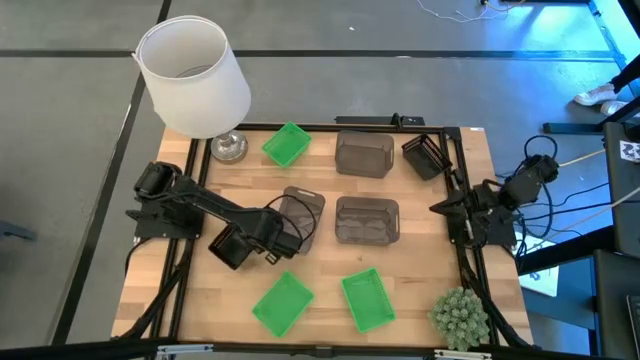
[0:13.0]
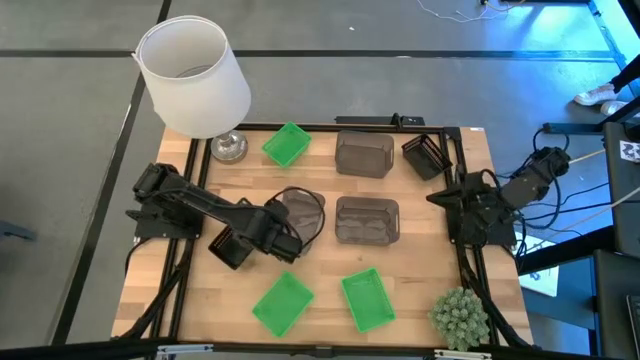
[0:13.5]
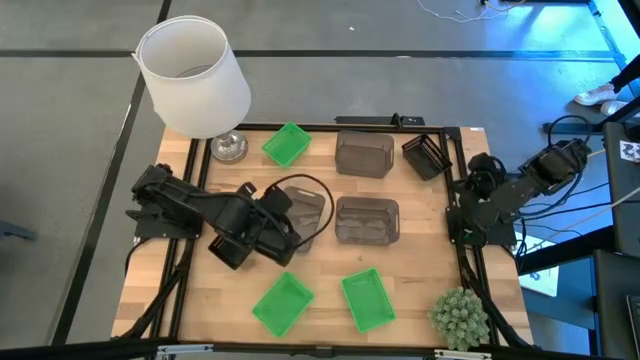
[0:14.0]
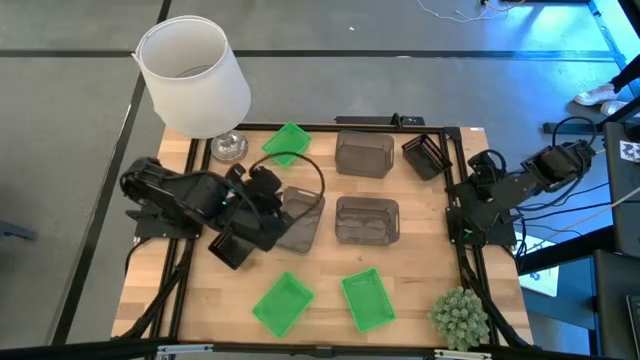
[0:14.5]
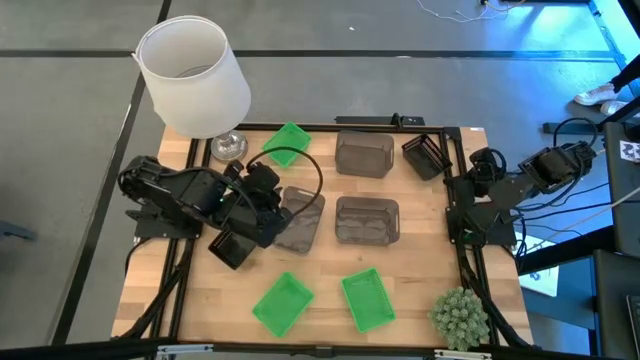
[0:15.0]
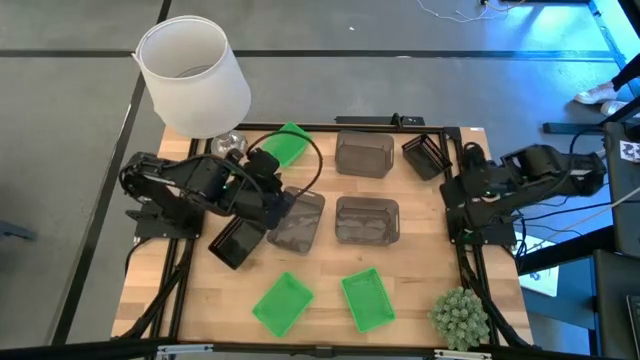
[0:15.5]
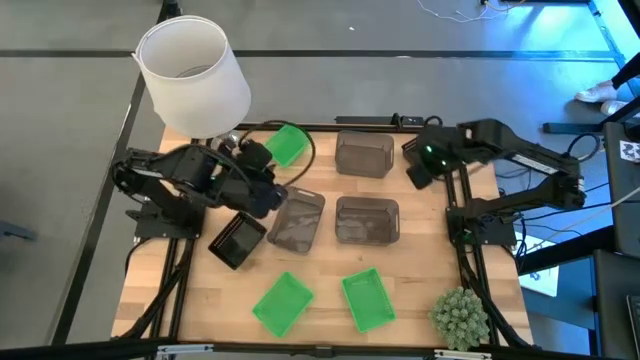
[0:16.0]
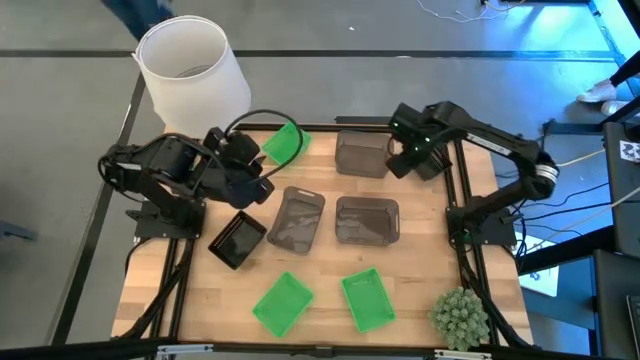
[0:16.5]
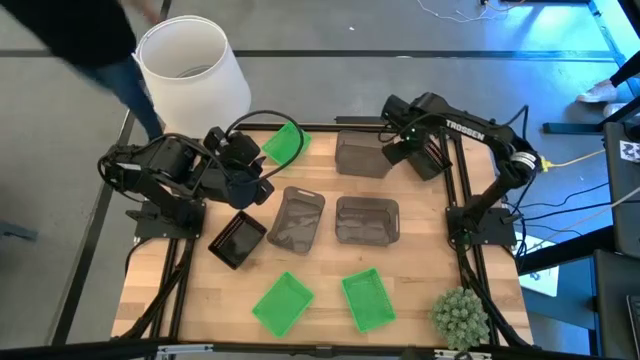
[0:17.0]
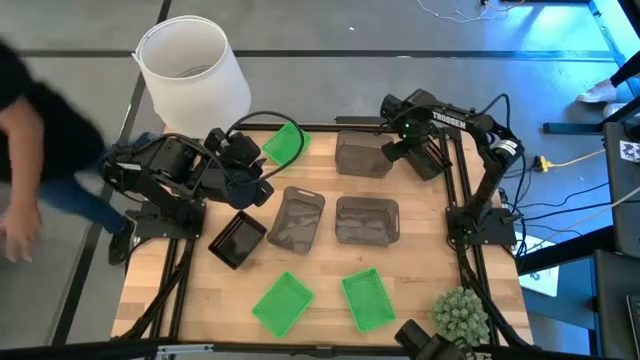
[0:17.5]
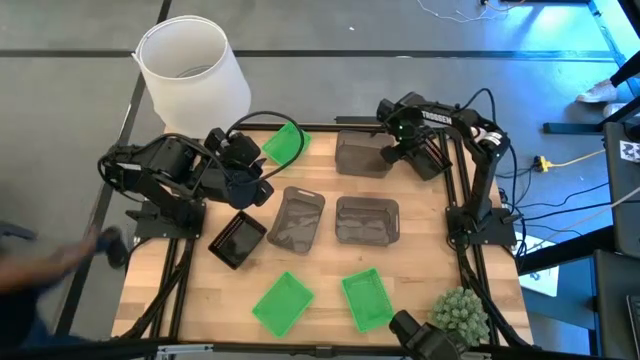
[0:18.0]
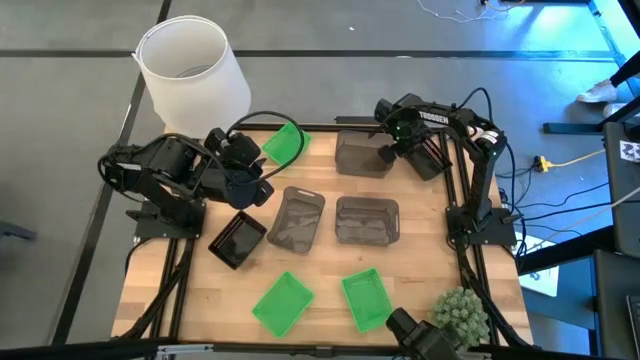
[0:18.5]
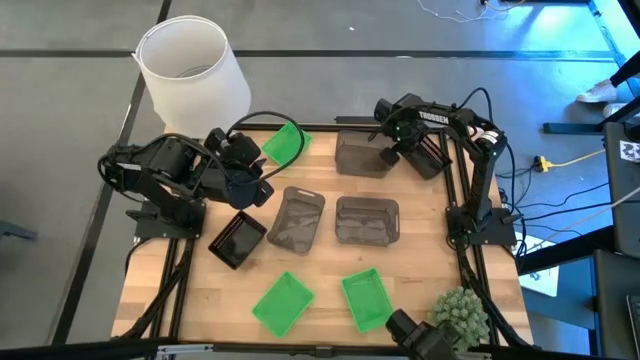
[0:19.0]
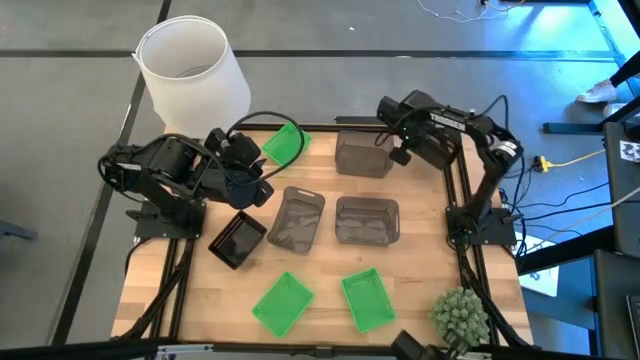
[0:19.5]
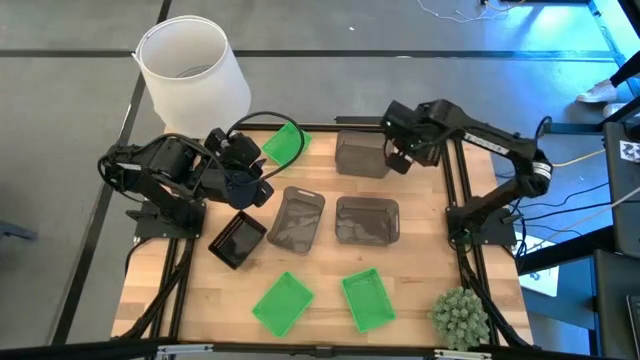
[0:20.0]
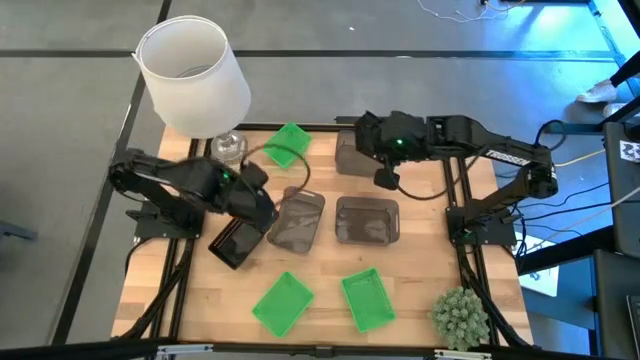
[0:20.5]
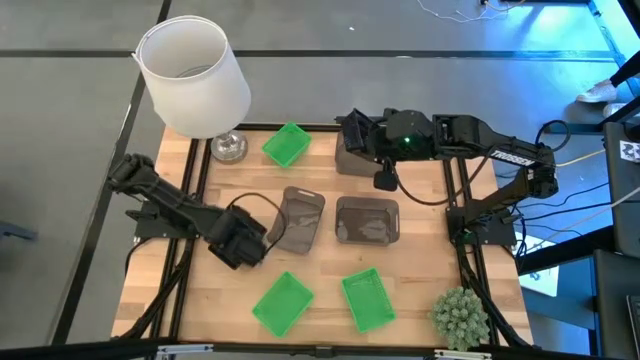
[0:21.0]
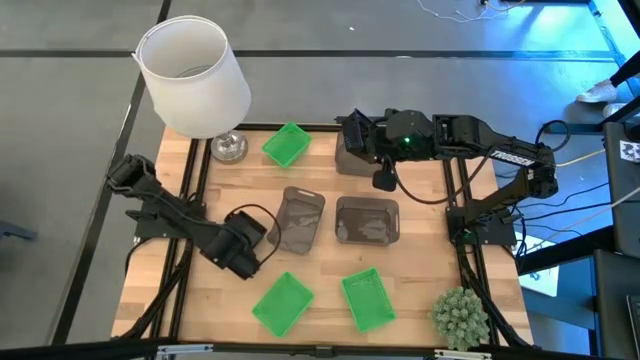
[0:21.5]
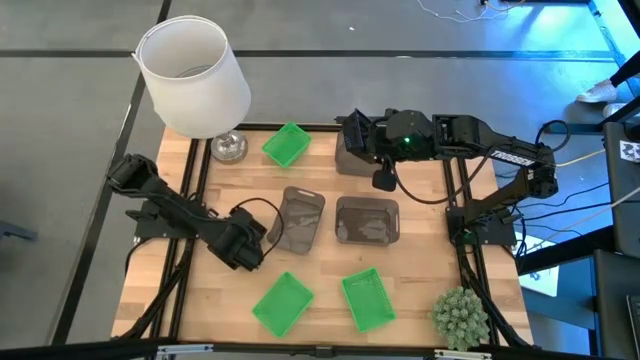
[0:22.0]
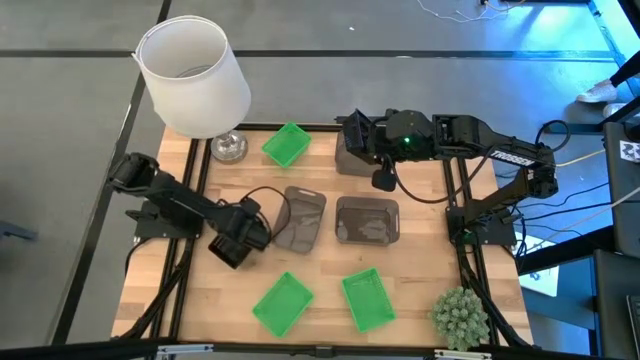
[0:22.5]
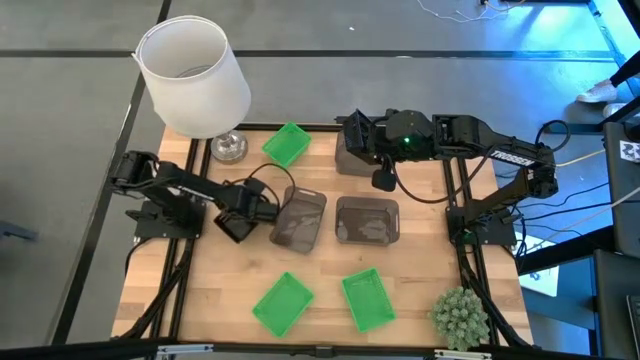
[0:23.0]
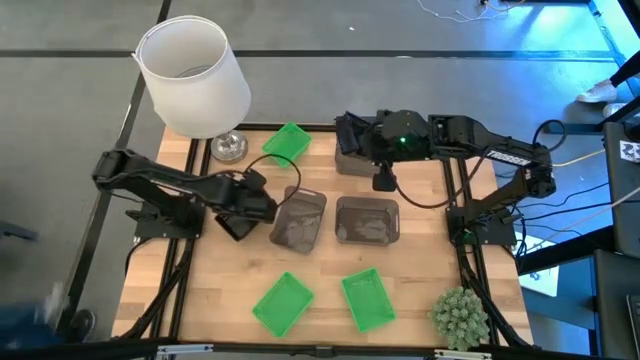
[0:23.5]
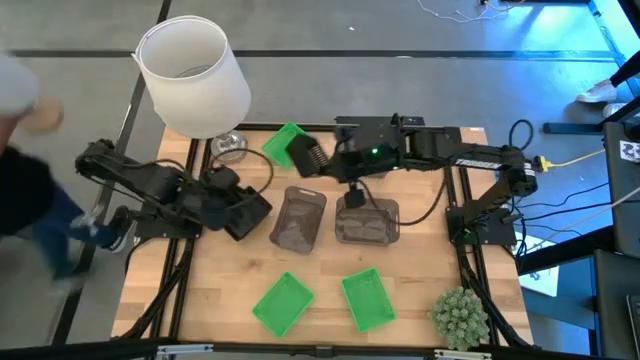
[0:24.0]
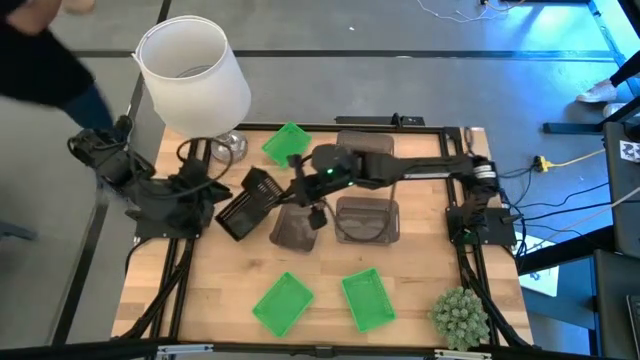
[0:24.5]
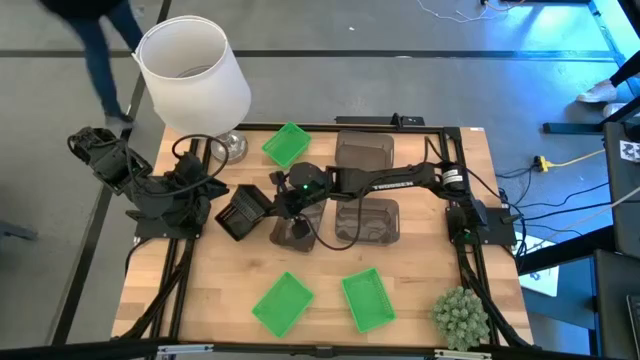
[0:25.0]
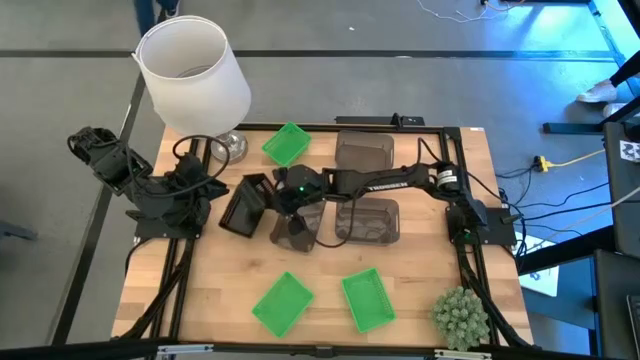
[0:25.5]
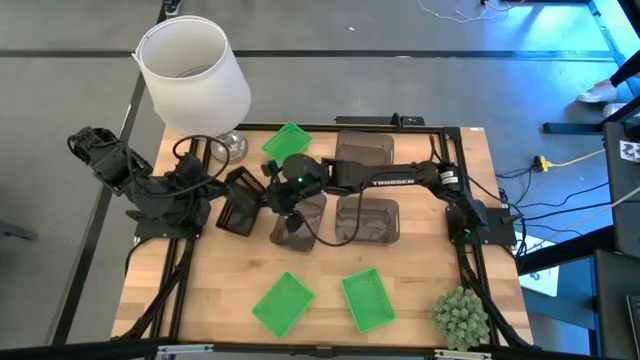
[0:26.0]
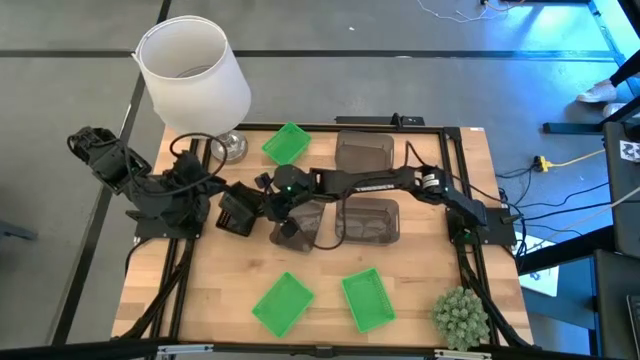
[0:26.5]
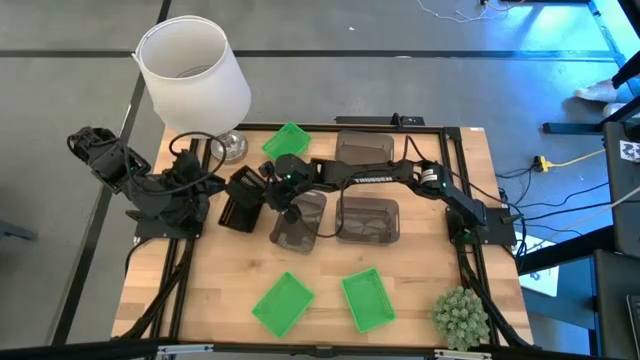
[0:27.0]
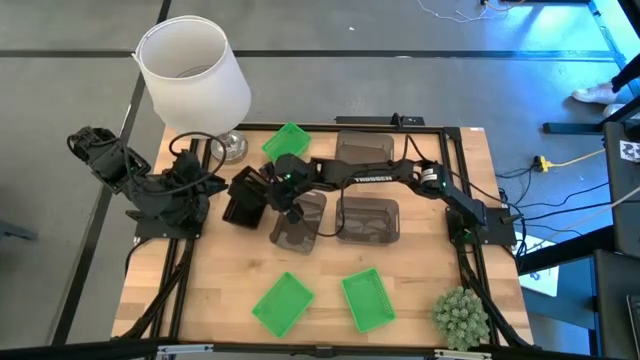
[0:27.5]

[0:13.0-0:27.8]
Stack the top black bin on the bottom black bin

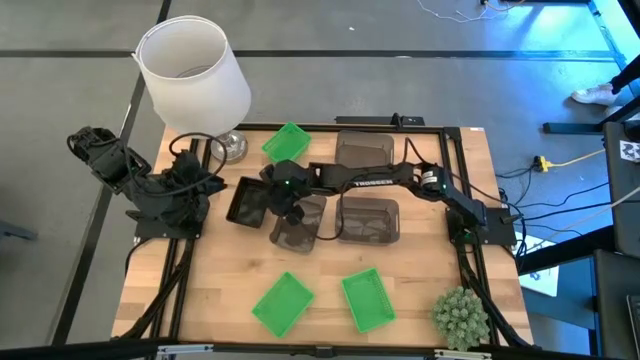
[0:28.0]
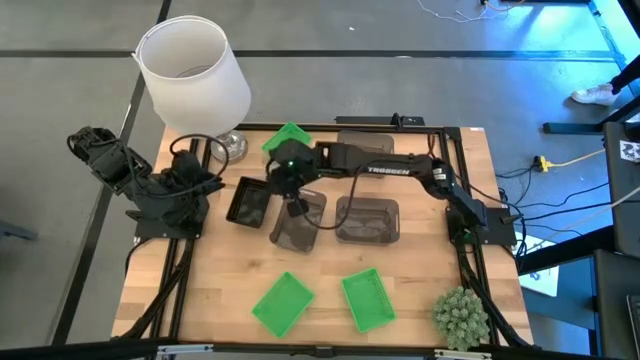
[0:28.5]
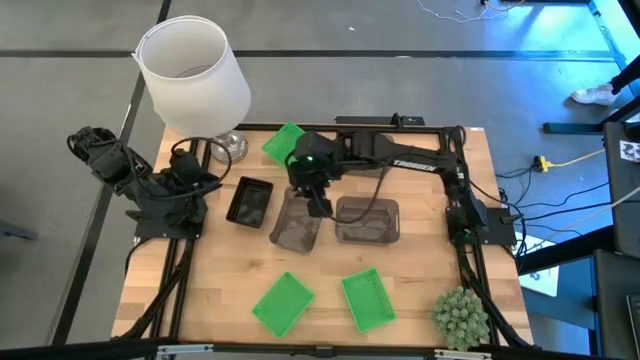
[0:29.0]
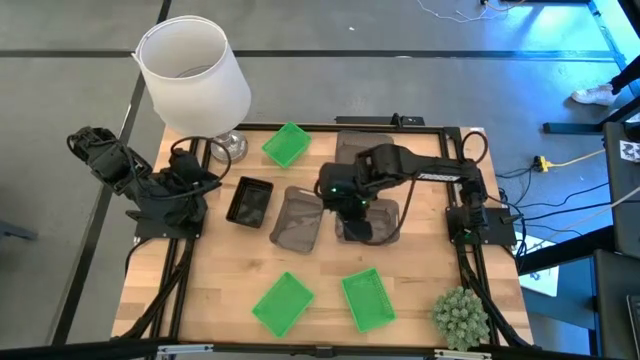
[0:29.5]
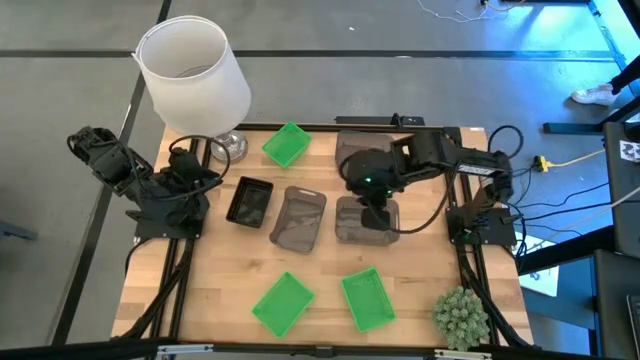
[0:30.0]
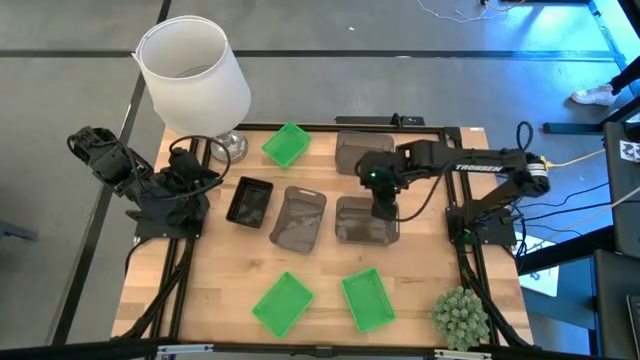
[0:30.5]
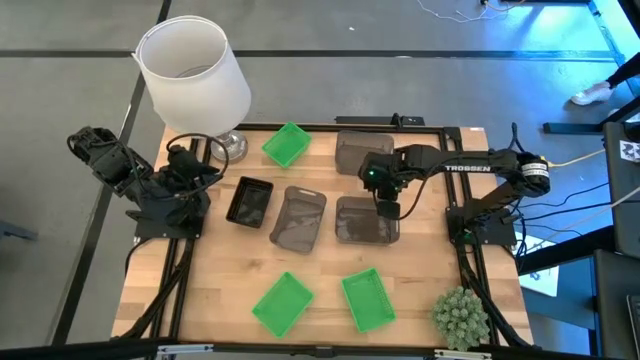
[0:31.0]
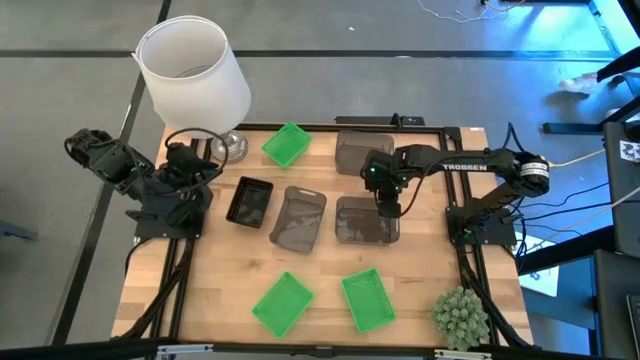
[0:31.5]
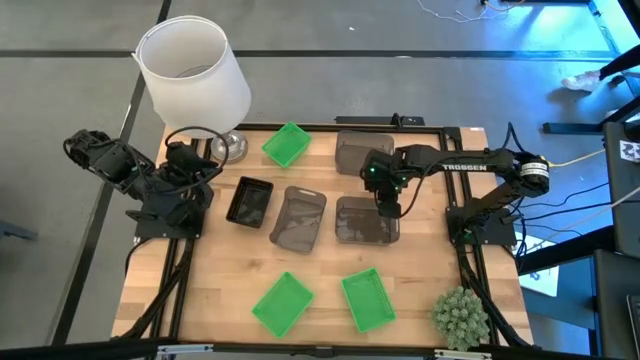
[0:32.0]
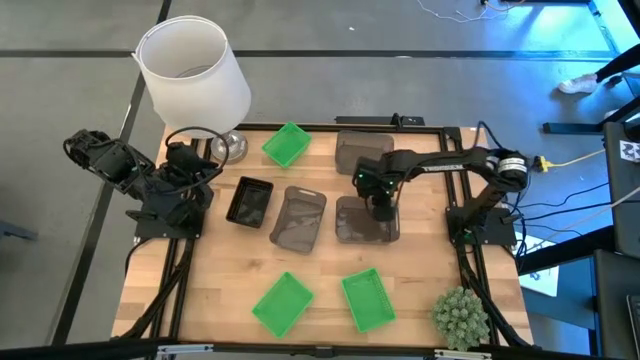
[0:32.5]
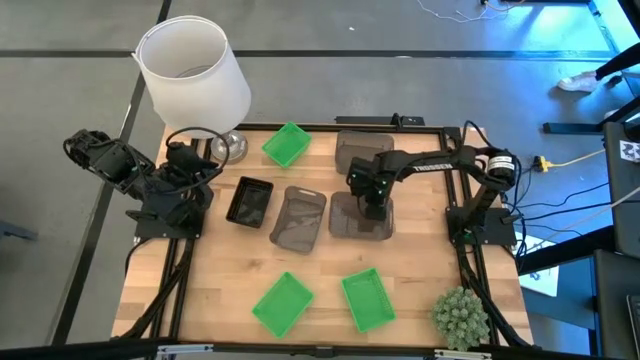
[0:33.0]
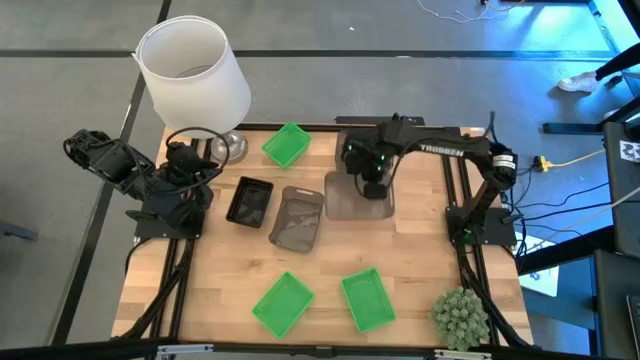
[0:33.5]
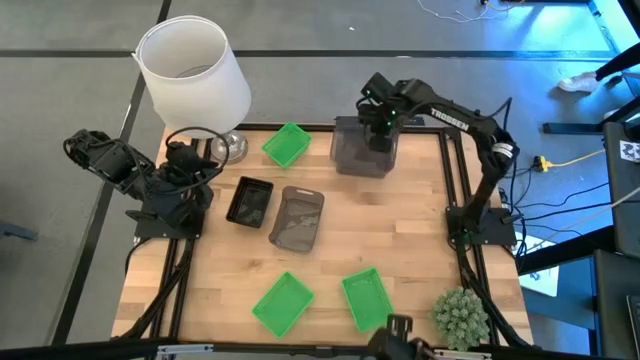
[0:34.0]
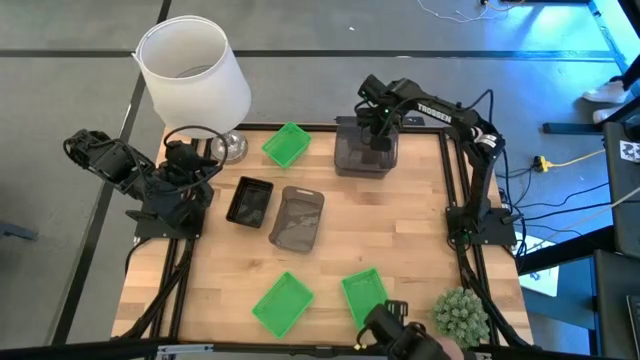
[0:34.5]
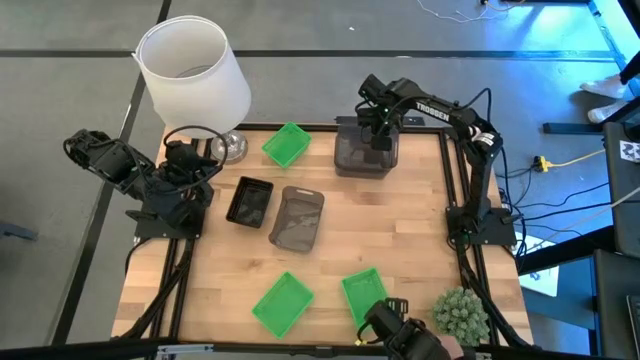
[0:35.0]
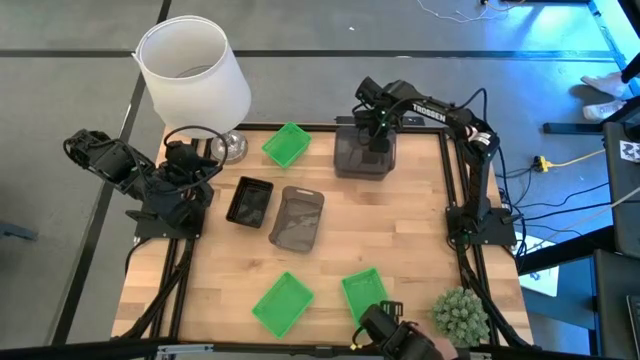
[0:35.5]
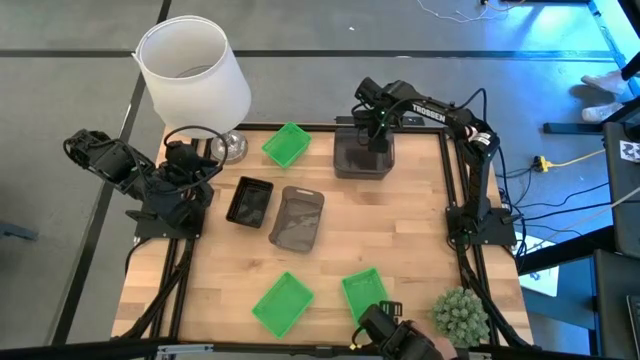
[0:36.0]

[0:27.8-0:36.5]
Stack the bottom right transparent black bin on the top transparent black bin
